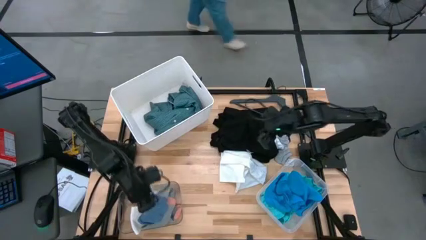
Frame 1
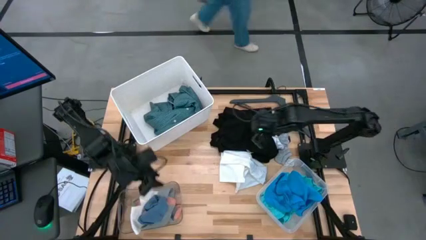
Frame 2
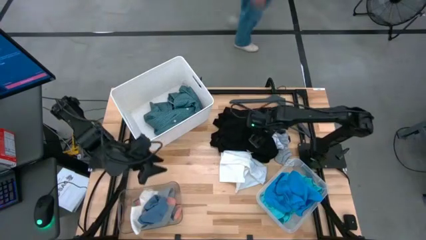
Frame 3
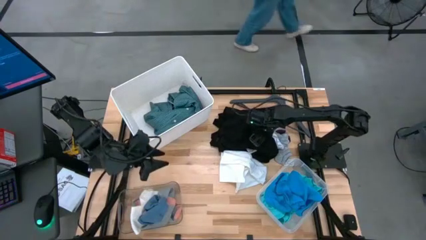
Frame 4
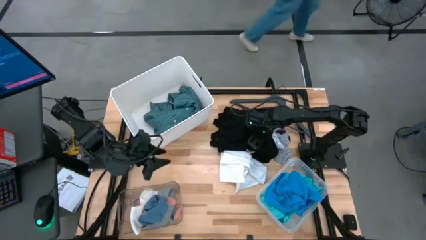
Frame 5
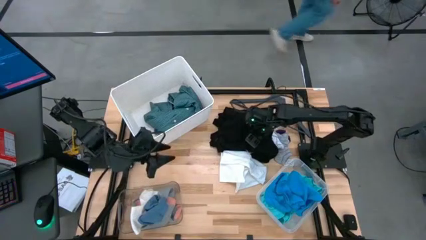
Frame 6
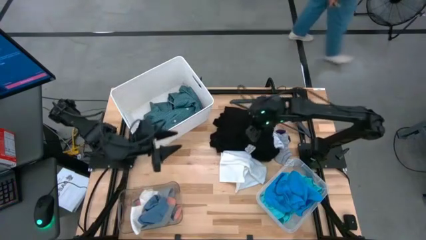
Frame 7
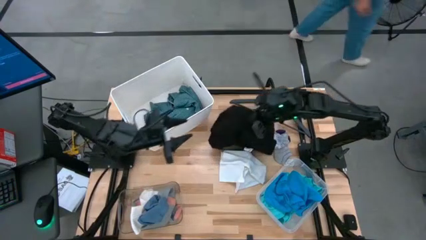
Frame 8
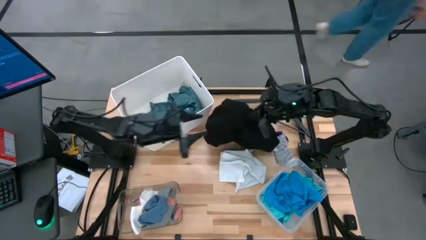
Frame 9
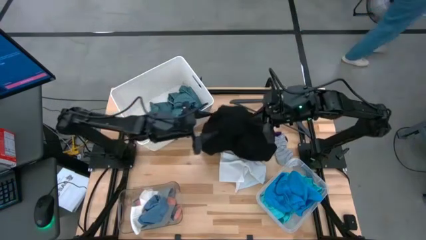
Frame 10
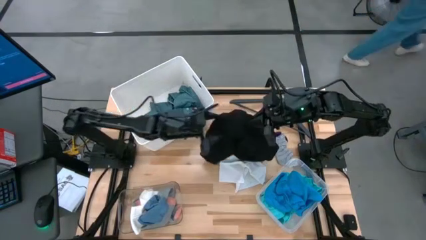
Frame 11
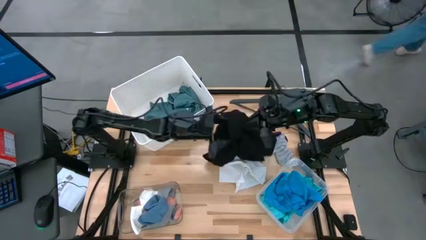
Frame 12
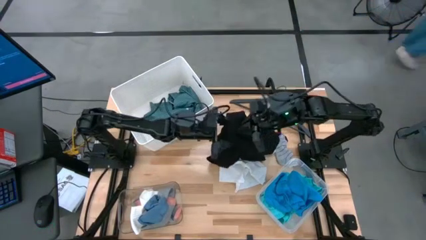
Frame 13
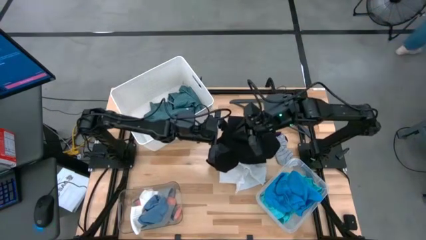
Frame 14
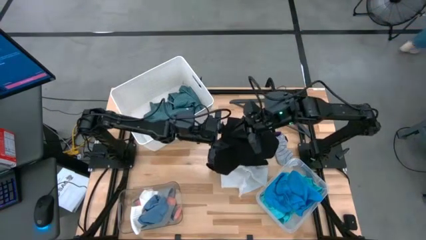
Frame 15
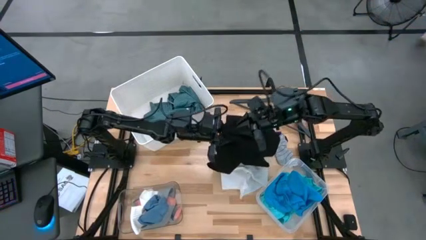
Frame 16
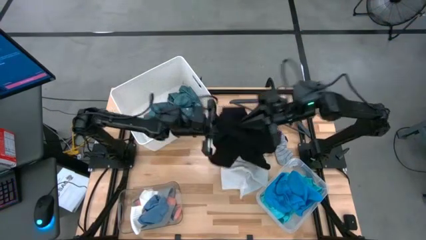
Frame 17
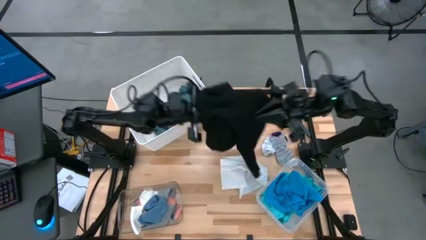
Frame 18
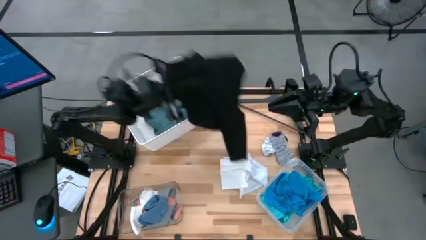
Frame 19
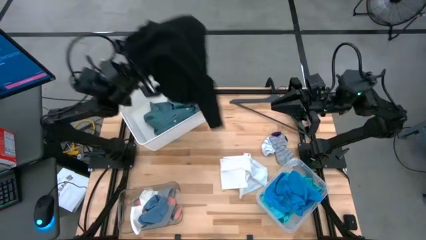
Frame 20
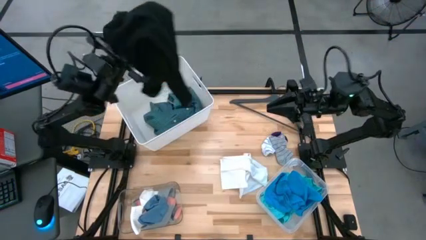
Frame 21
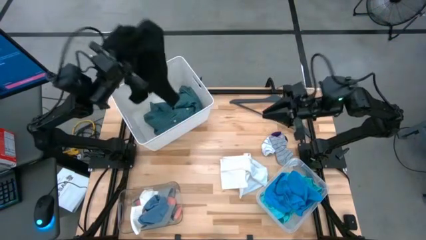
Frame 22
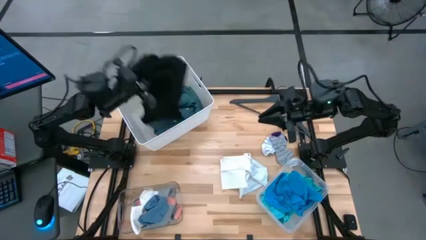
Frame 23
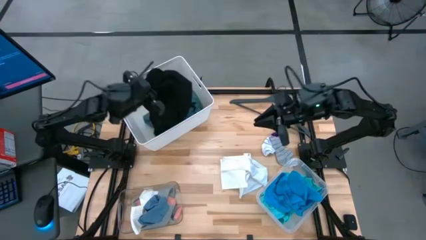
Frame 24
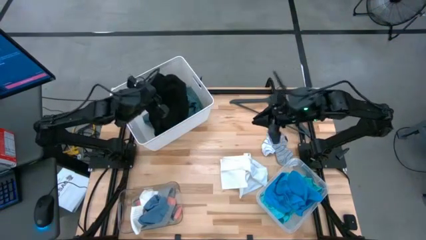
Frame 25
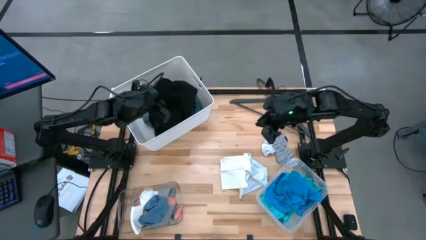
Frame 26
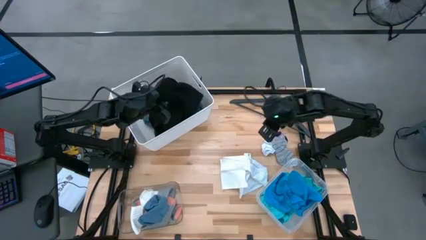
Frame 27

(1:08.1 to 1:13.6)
Task: Pick & Place Cloths
Put the black shirt into the white bin

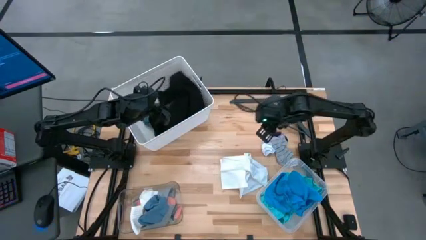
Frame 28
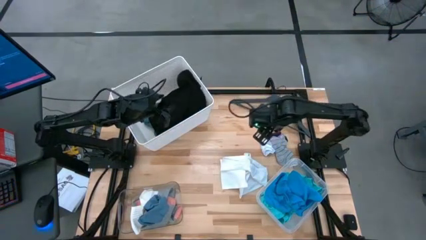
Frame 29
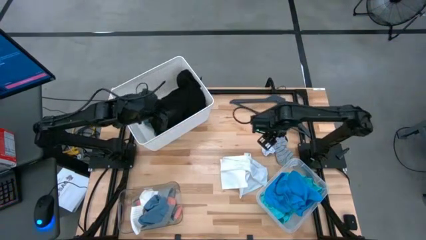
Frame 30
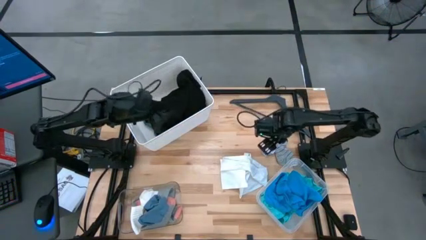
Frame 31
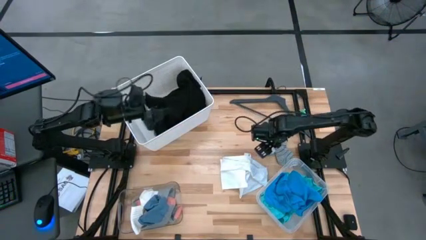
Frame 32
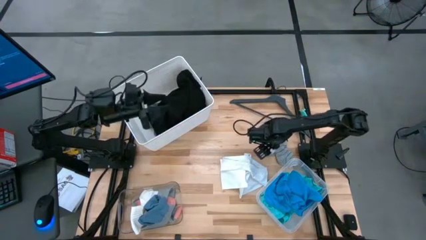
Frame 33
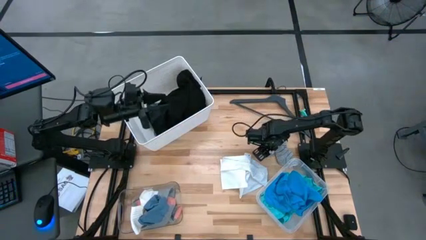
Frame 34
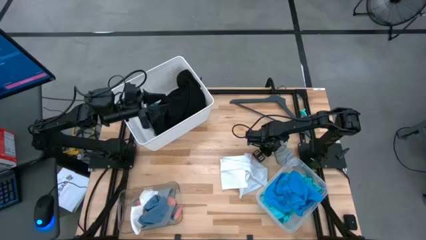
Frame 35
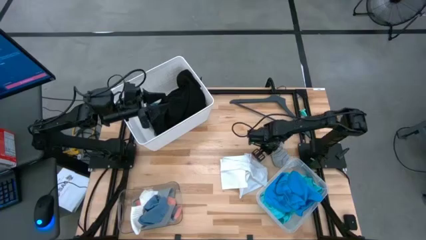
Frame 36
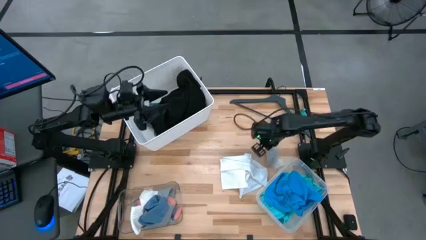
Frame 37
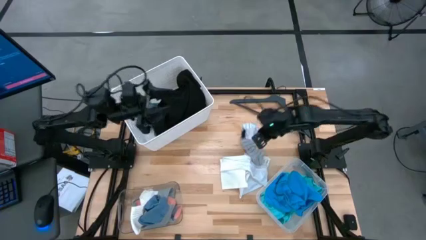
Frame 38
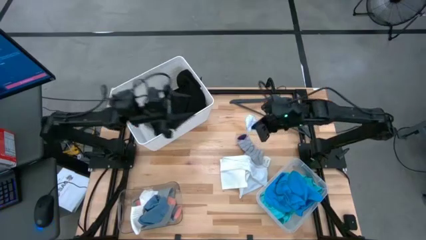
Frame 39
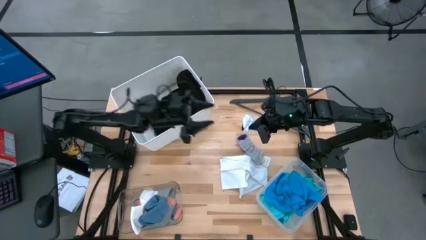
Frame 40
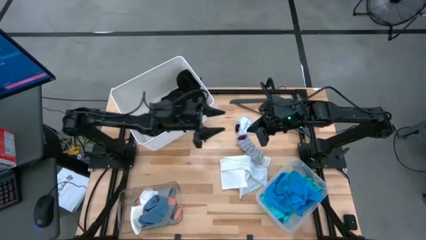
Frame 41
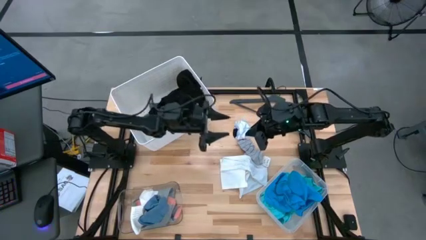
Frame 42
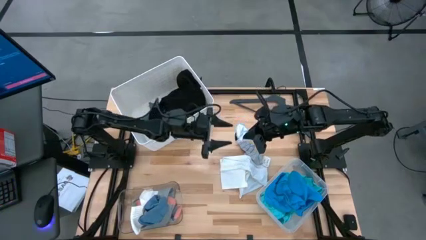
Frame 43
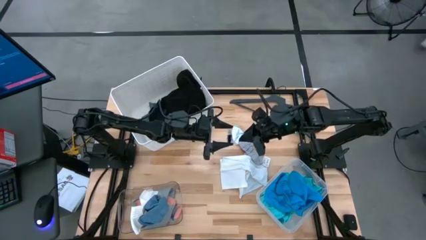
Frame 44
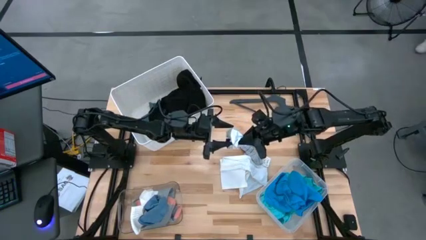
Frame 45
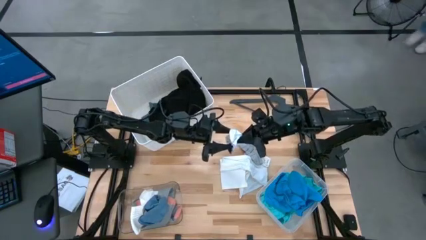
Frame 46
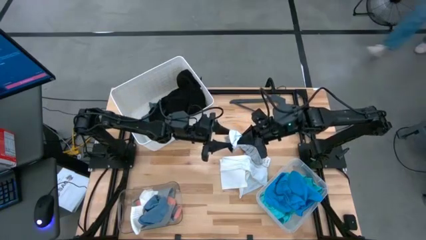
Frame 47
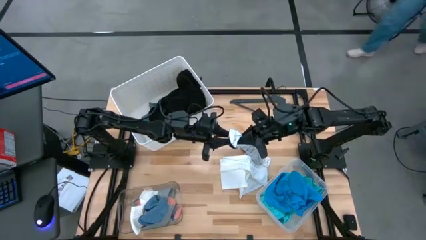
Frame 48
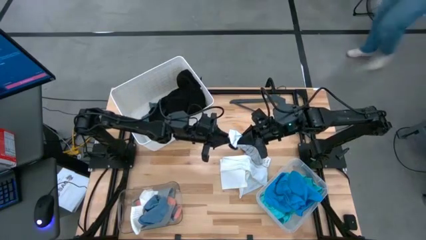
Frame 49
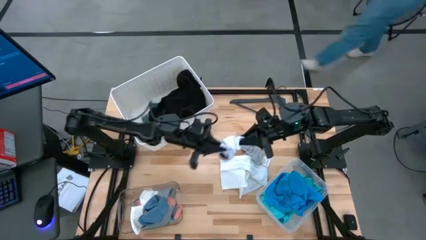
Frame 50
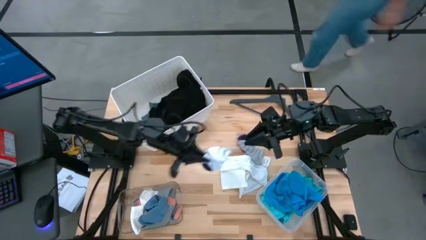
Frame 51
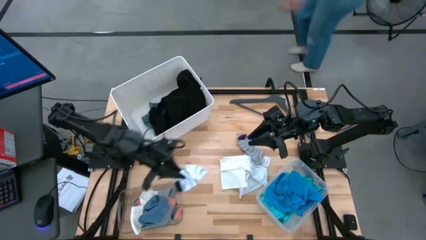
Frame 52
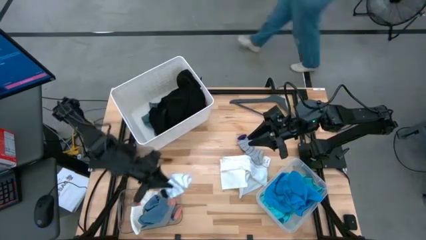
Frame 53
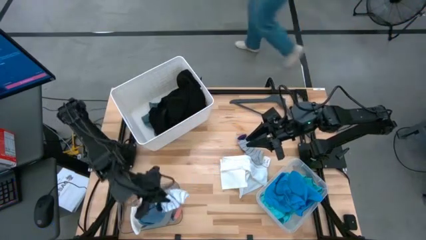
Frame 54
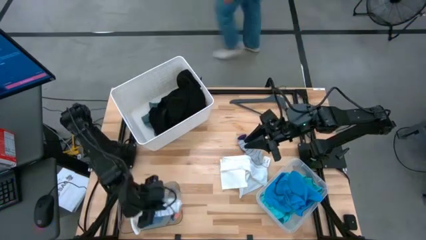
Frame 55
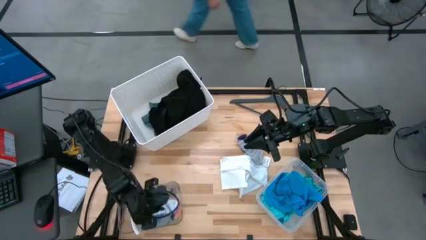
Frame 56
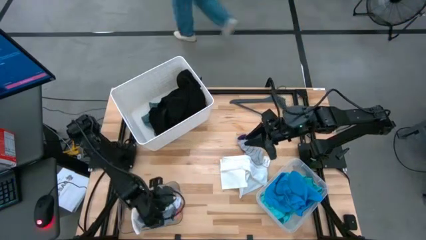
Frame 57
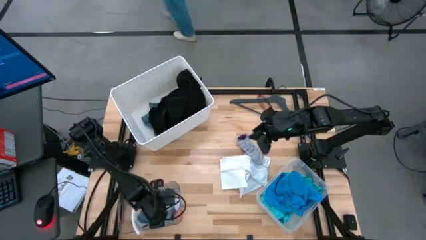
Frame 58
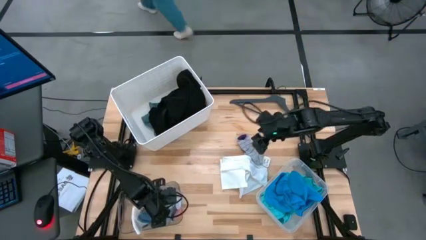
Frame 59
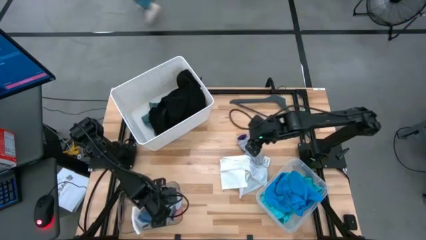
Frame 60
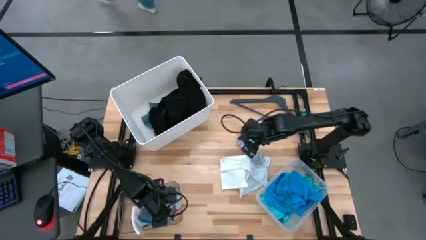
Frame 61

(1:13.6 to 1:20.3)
Put the striped white sock into the left transparent bin

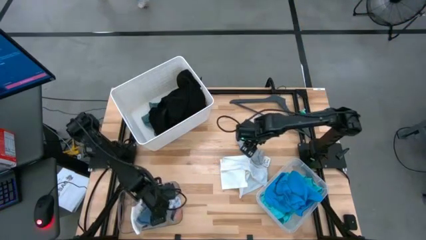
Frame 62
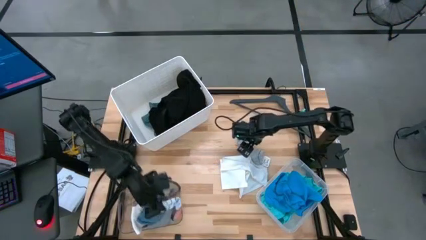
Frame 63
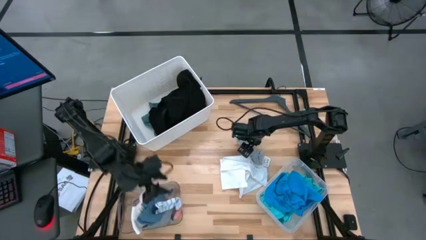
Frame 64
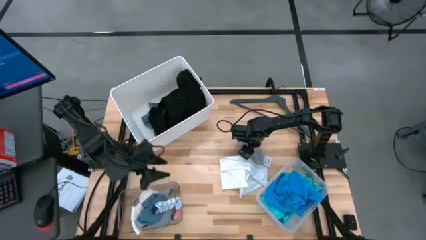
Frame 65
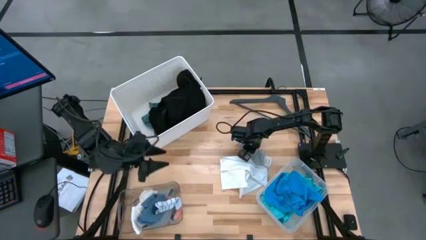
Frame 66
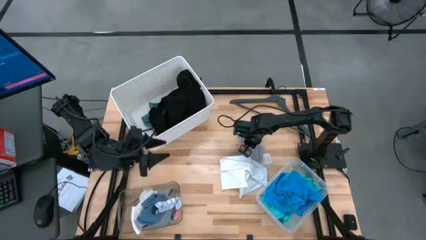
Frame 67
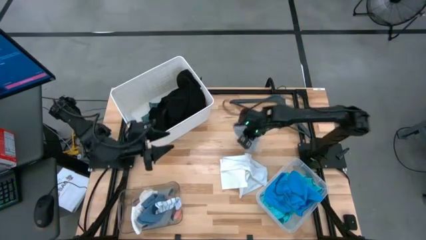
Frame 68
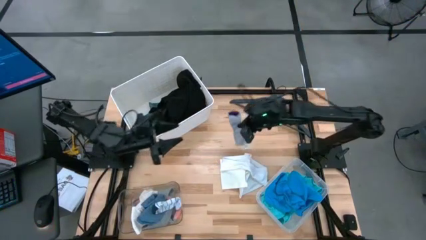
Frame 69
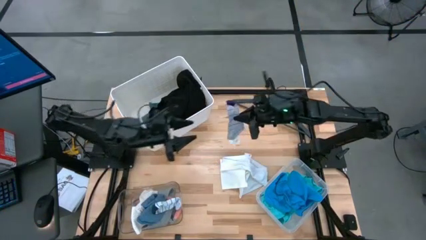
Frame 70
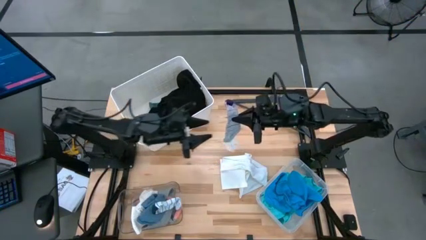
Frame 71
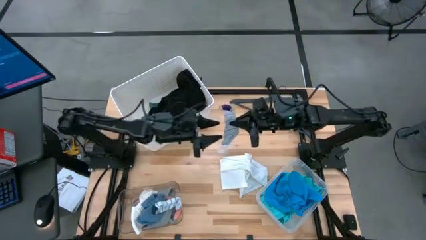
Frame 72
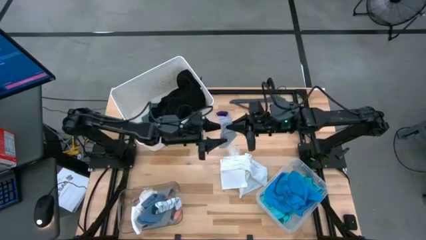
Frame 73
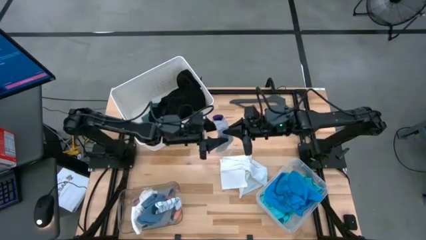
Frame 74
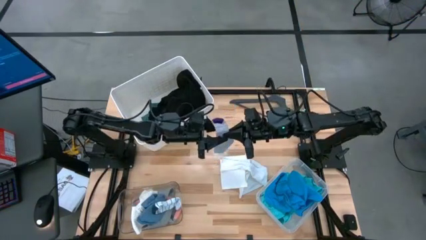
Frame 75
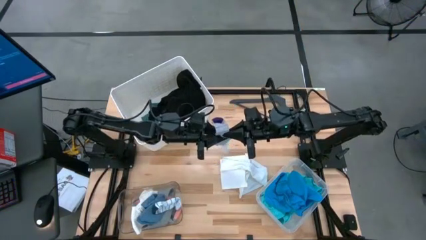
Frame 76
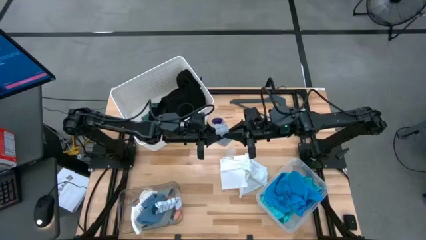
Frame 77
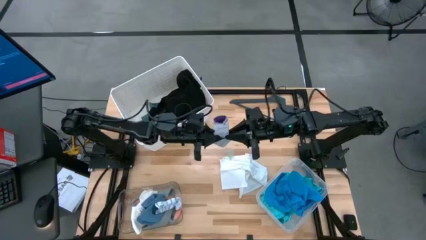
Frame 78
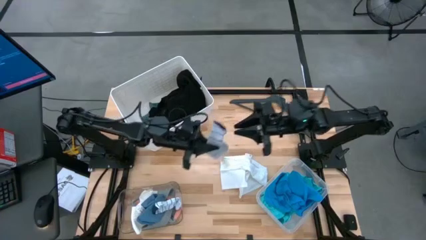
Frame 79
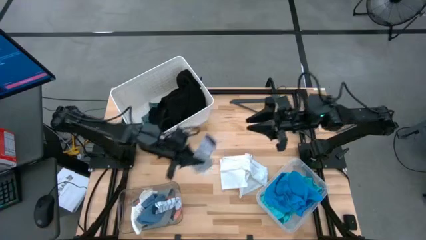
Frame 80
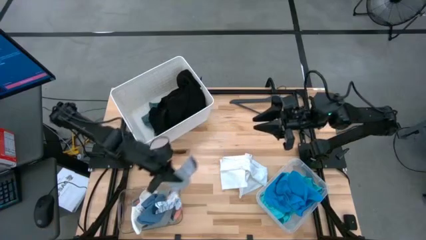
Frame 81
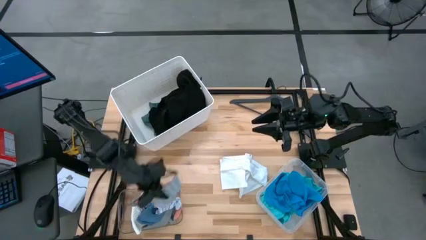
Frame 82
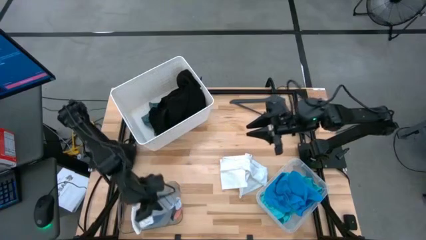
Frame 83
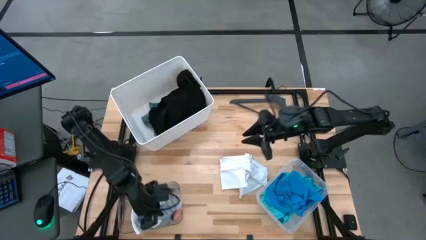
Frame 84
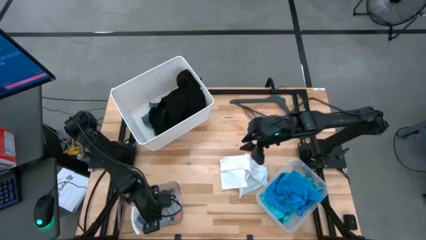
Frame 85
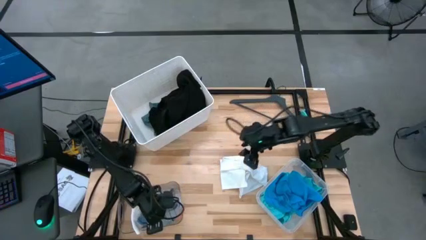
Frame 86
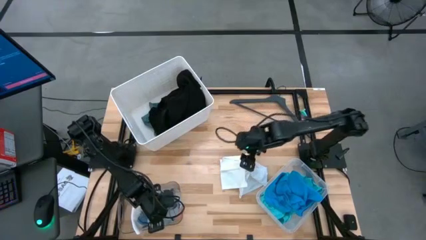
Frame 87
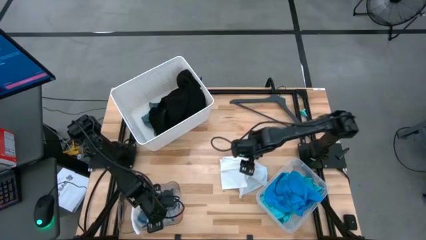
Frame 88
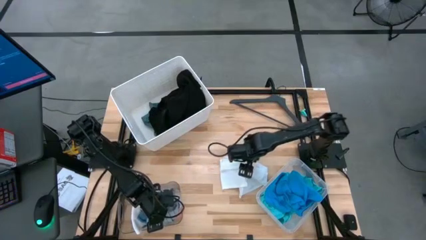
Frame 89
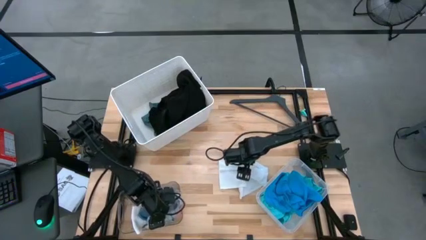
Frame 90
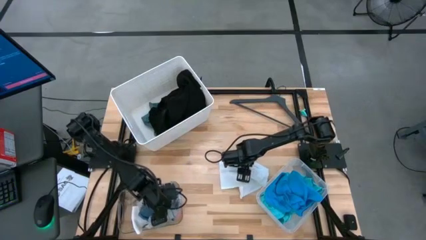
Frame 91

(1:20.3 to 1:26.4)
Put the striped gray sock into the left transparent bin
